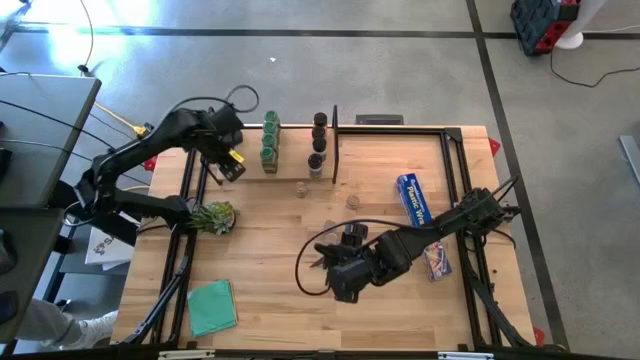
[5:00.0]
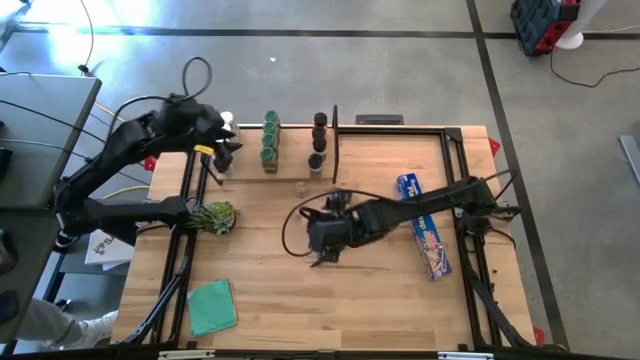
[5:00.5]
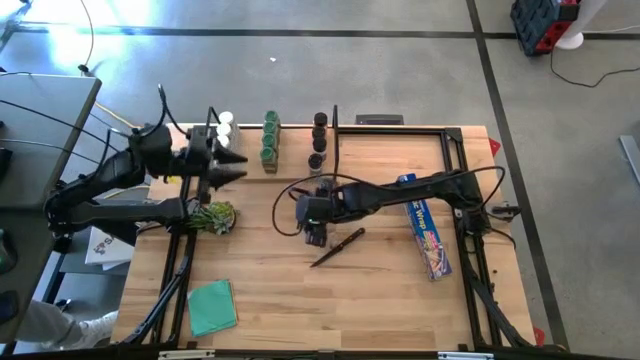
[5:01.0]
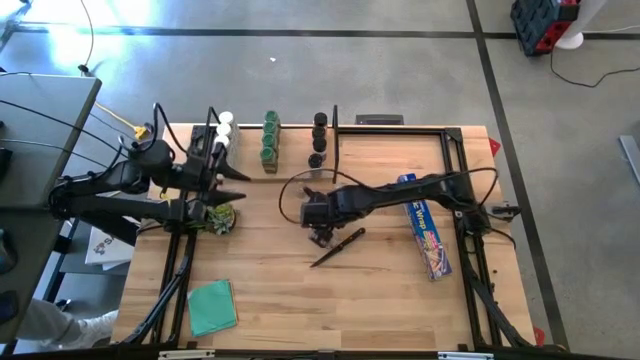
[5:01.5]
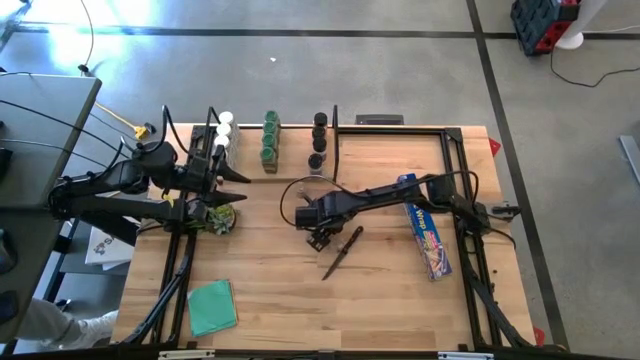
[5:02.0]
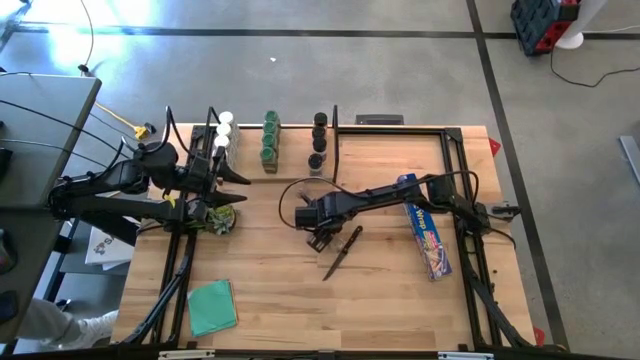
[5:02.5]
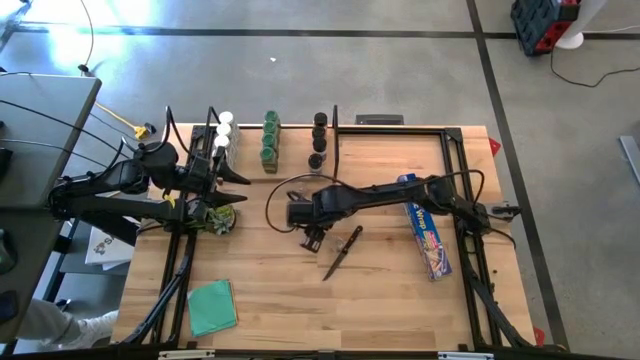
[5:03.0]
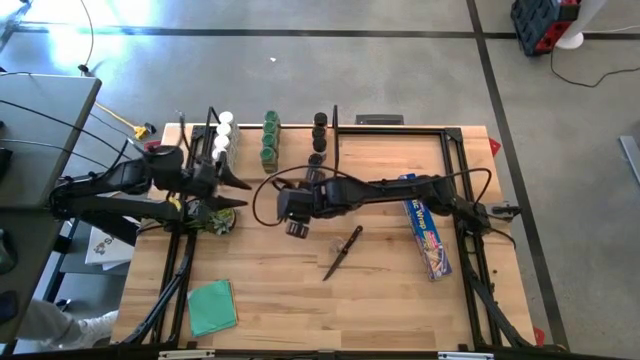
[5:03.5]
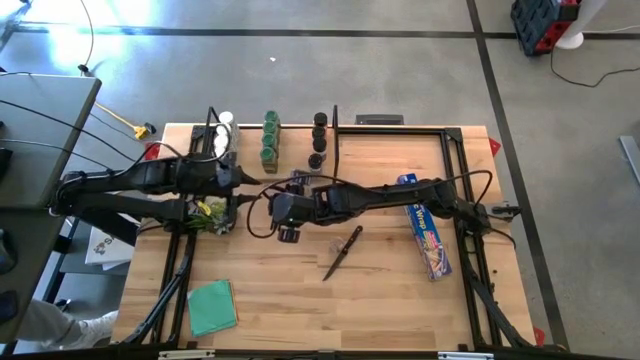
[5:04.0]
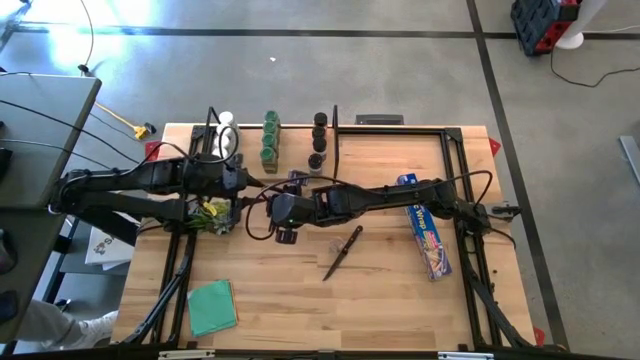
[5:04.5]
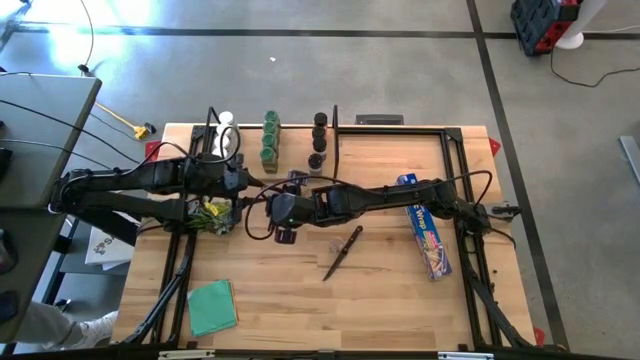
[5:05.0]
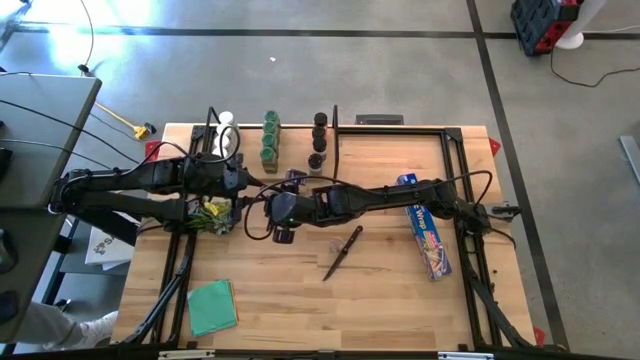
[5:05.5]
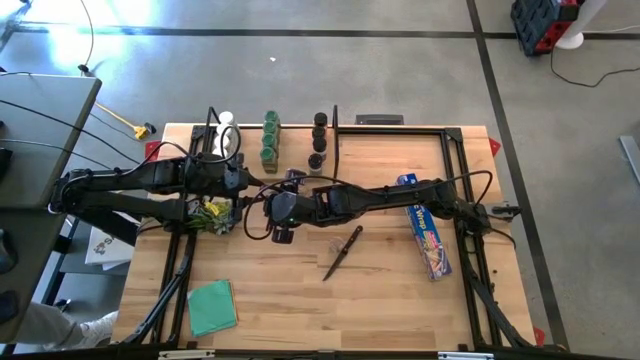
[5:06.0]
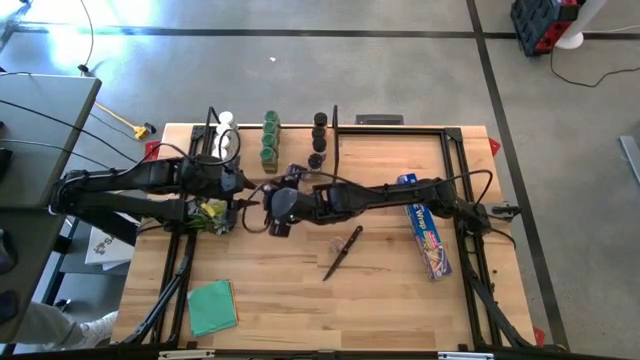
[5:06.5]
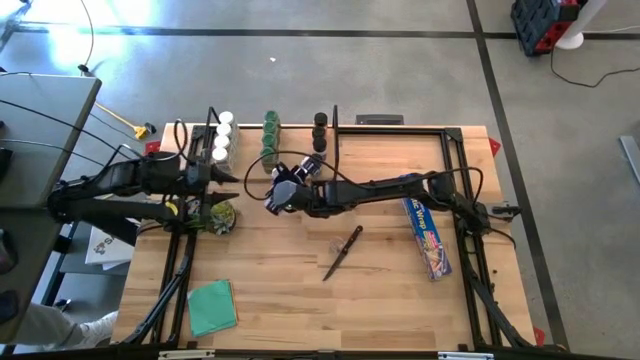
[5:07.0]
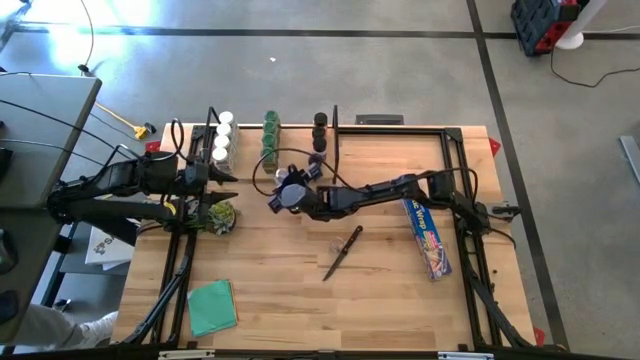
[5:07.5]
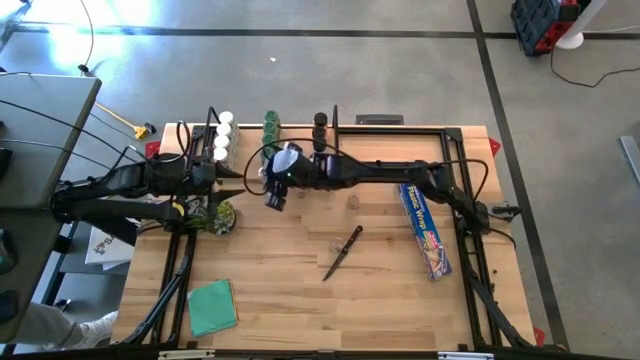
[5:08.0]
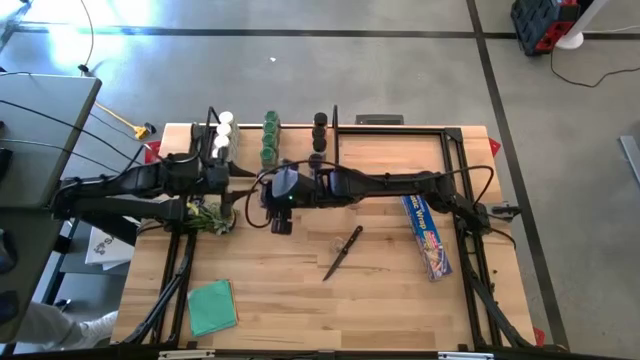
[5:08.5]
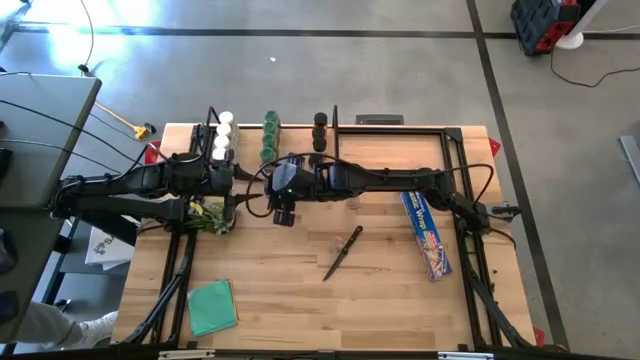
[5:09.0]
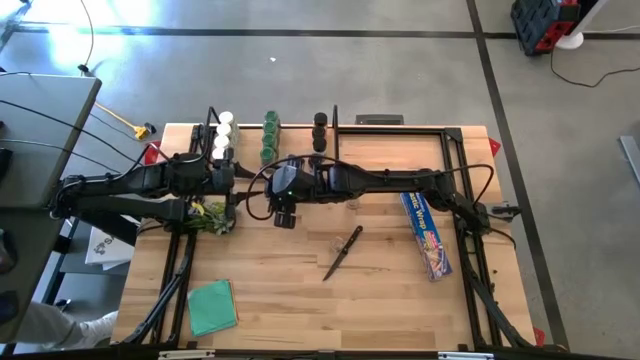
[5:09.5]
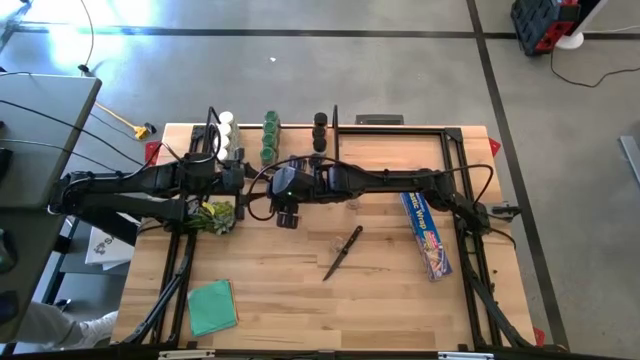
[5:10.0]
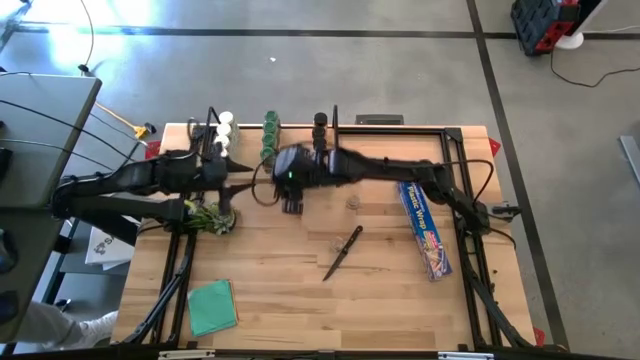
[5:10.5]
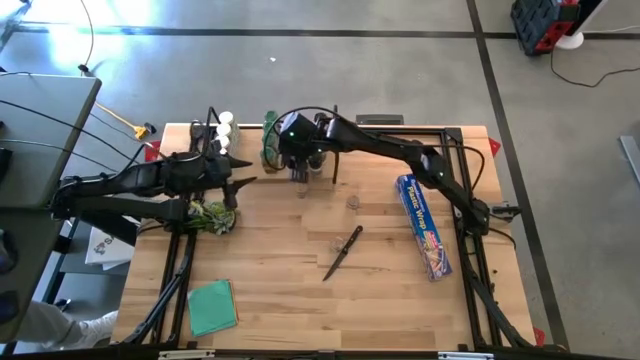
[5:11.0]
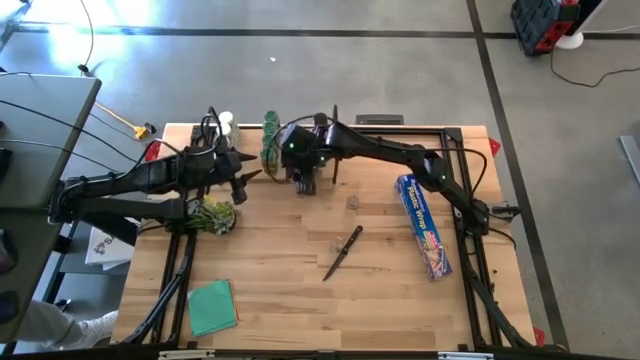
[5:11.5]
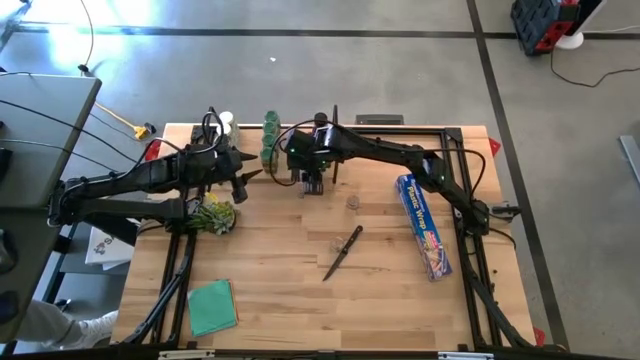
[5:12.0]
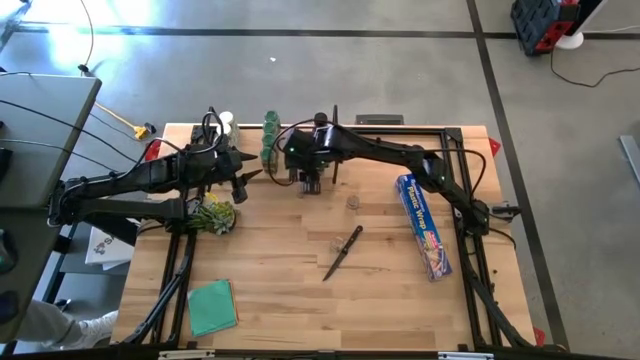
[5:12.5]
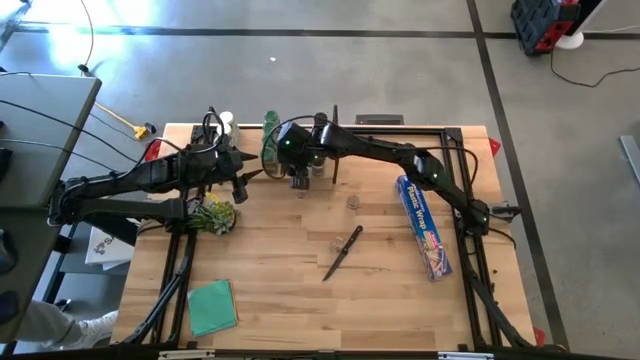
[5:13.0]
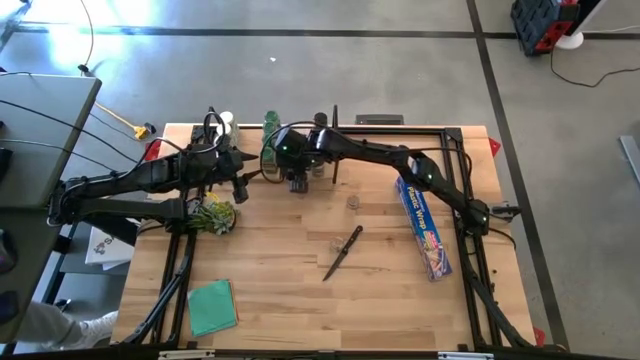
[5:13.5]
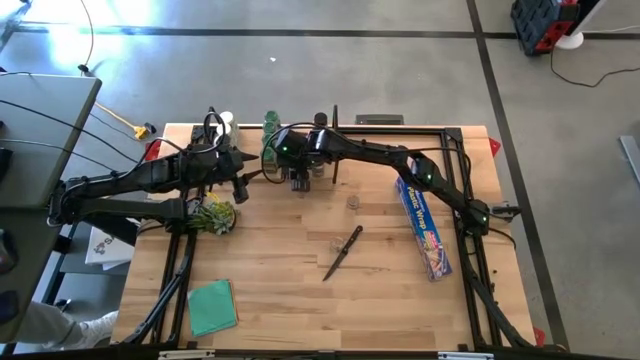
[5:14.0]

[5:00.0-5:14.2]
Task: Shelf spices
Put the brown lid seasoning bottle on the shelf

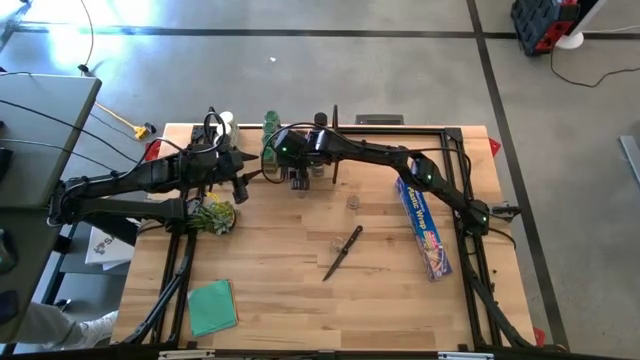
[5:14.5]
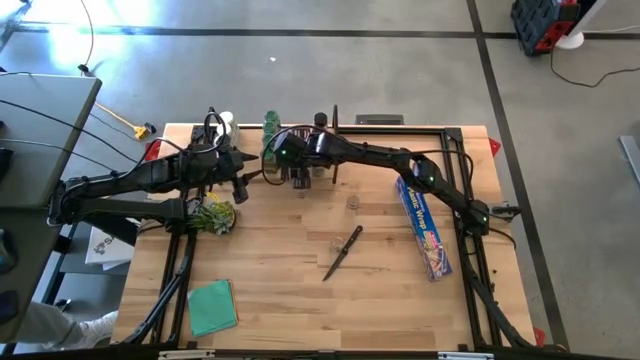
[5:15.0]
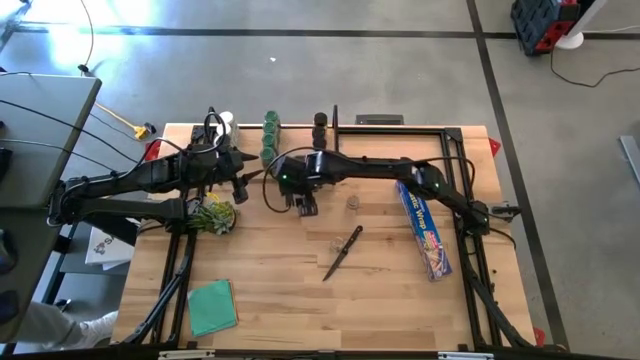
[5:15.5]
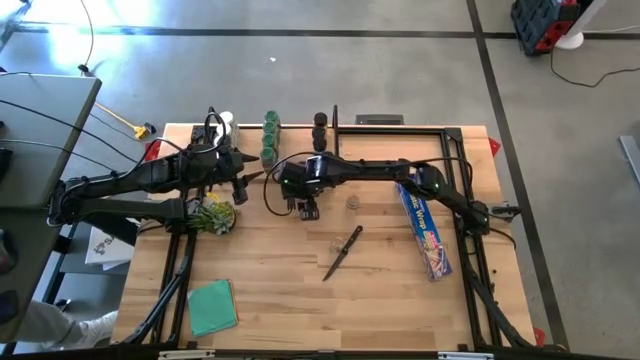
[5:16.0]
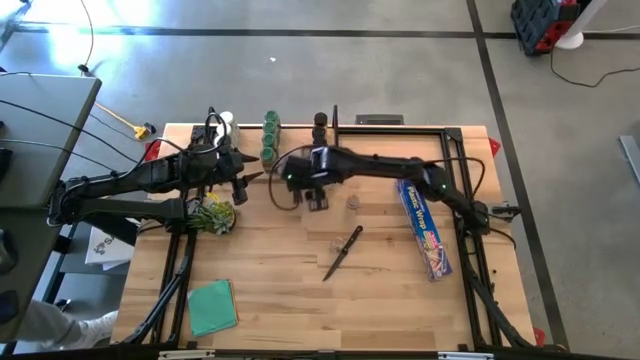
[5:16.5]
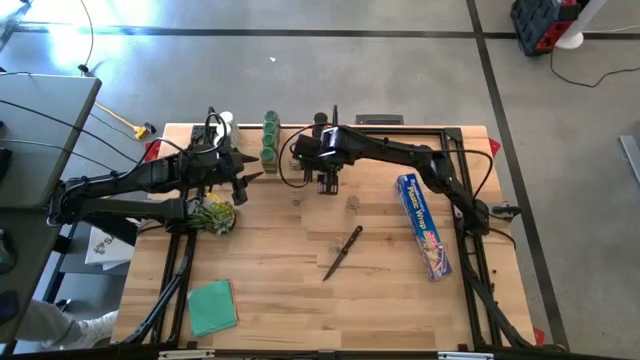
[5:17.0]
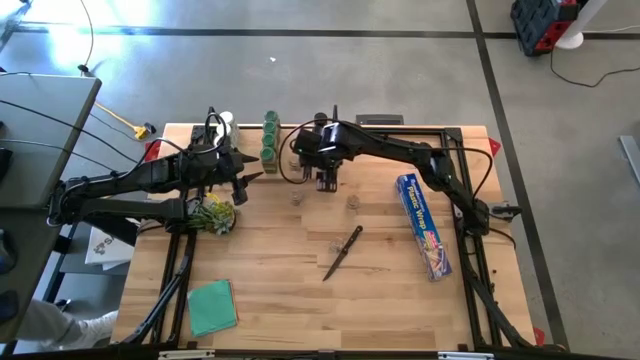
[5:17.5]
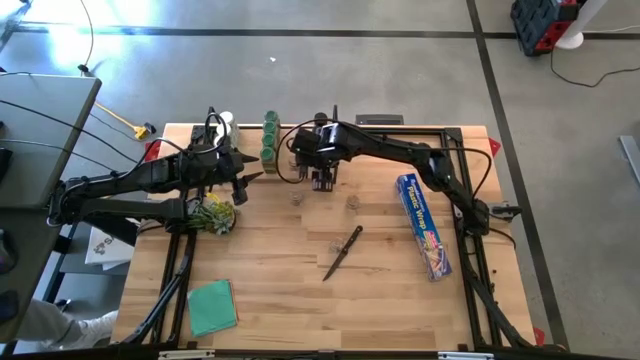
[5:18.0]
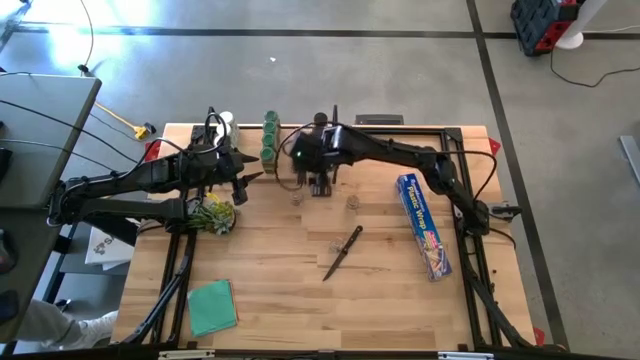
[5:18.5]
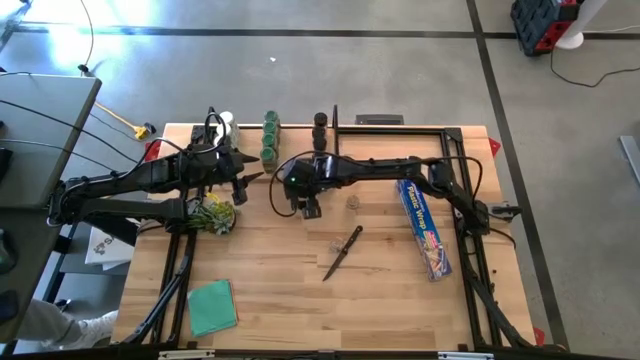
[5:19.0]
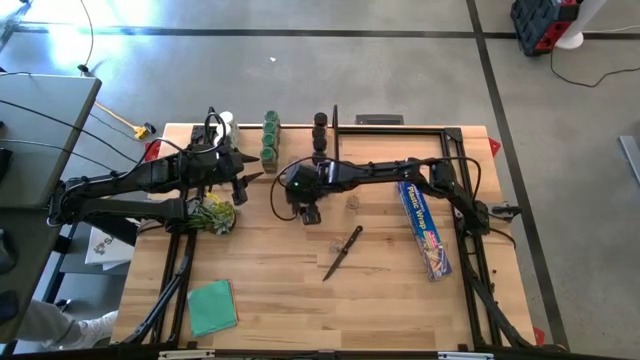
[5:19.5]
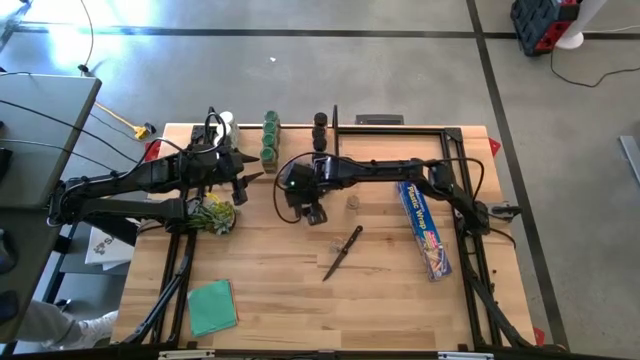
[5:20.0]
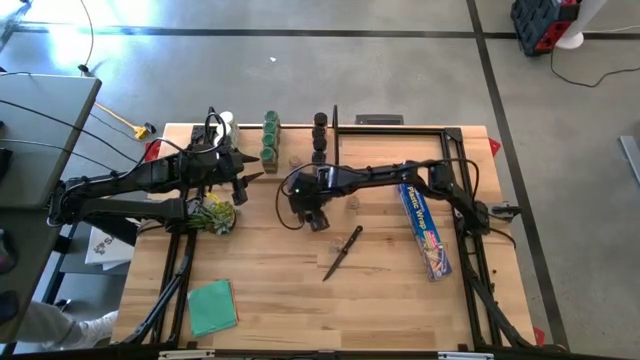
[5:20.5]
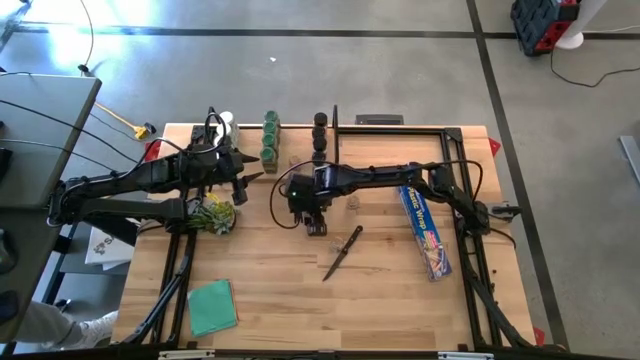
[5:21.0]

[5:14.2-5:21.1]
Put the brown lid seasoning bottle on the shelf
